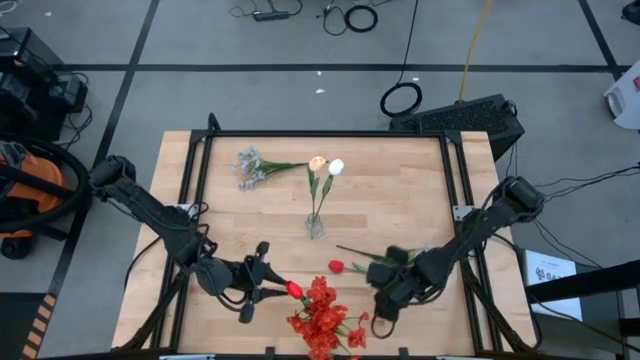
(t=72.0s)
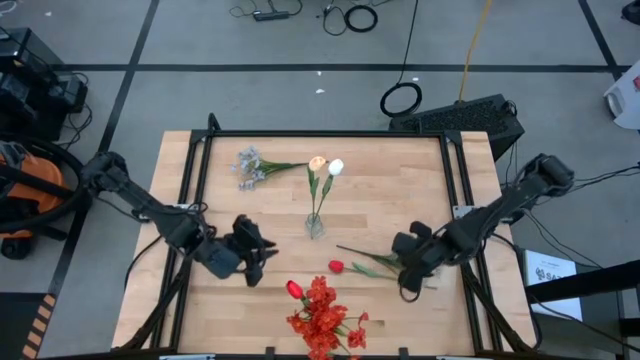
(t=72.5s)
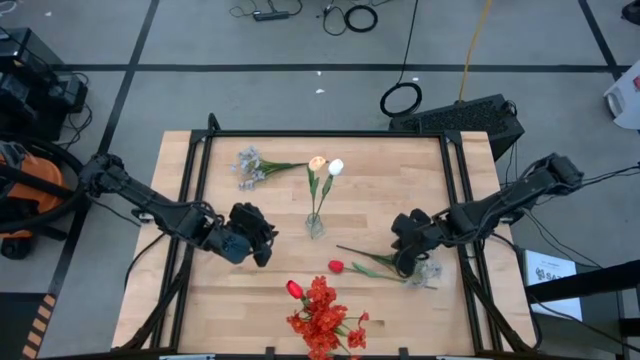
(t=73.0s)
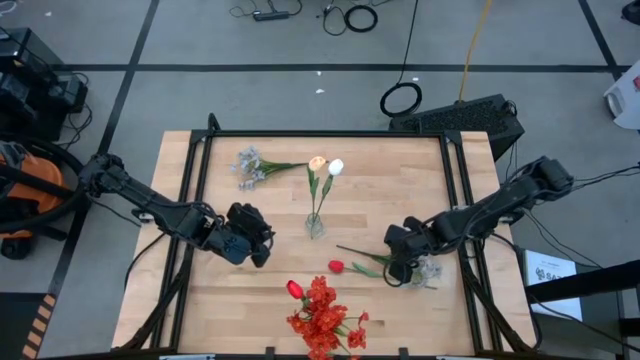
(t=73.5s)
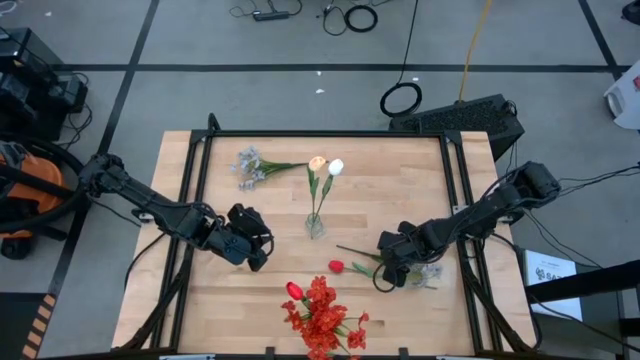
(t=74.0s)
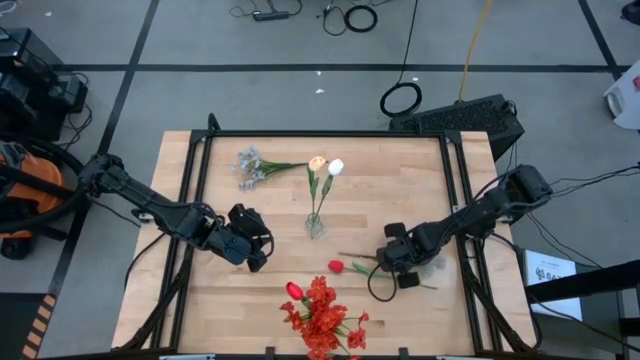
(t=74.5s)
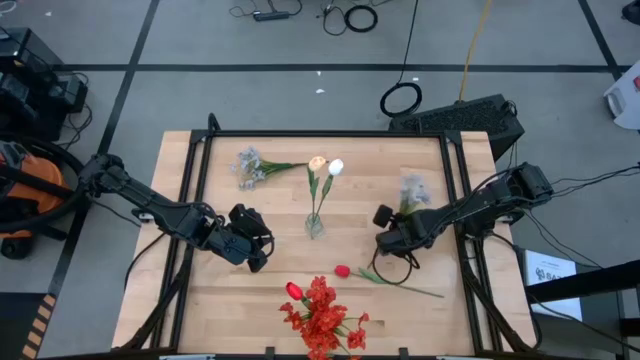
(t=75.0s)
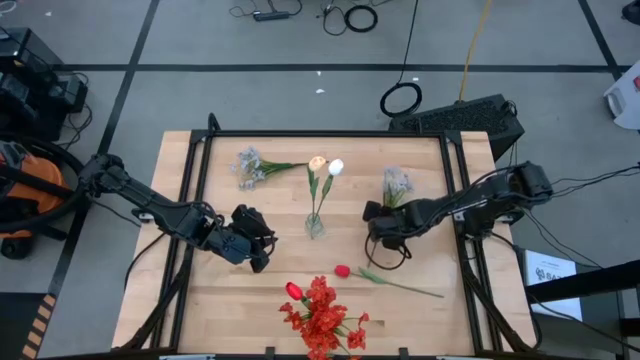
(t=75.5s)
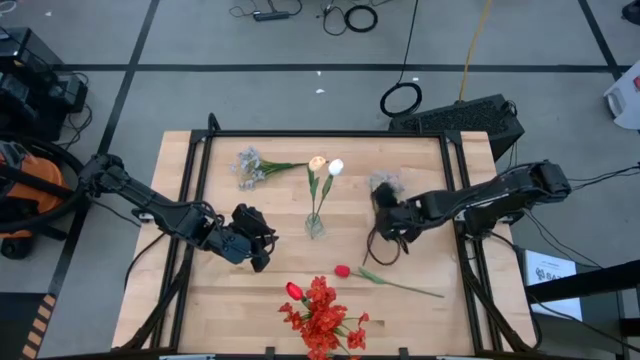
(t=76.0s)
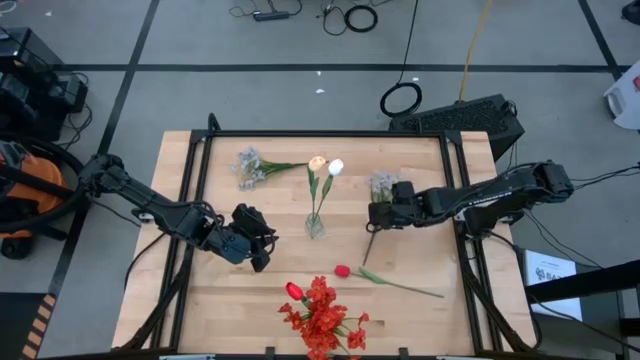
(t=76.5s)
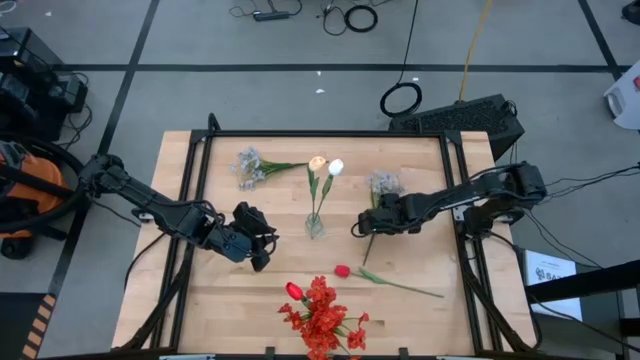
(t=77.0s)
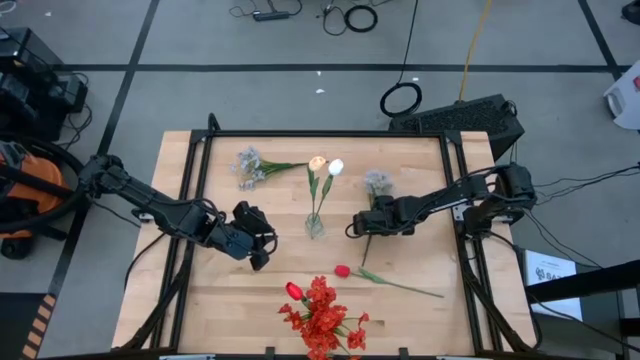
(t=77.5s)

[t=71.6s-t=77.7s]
Task: Sort flowers into vase by color
Put the bottom white flowers into the transparent vase

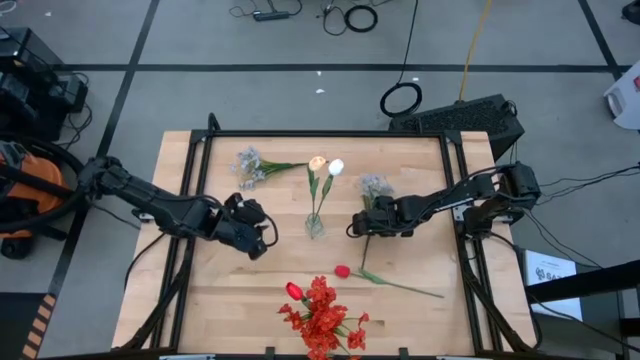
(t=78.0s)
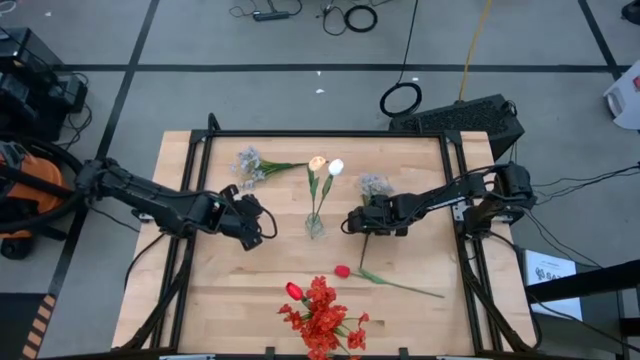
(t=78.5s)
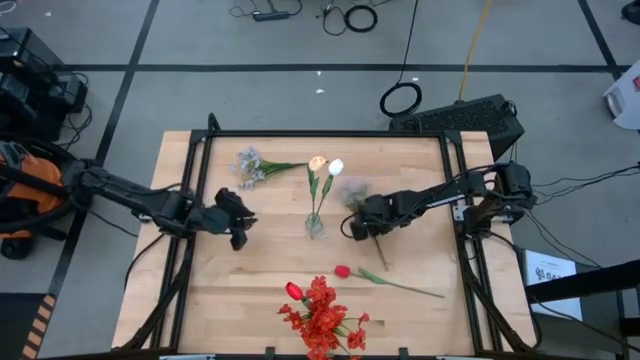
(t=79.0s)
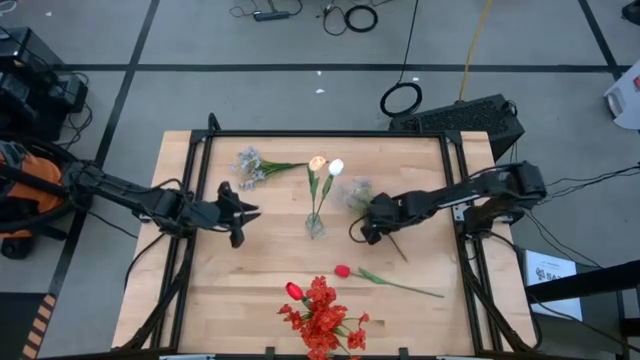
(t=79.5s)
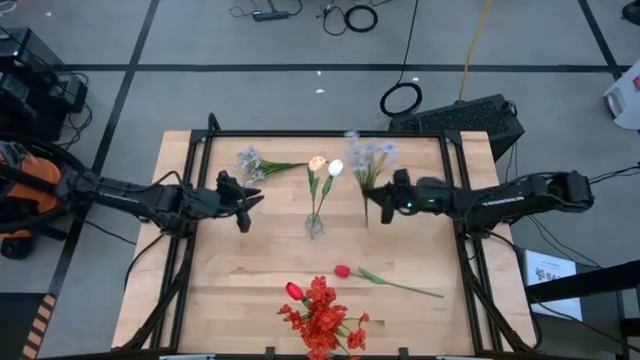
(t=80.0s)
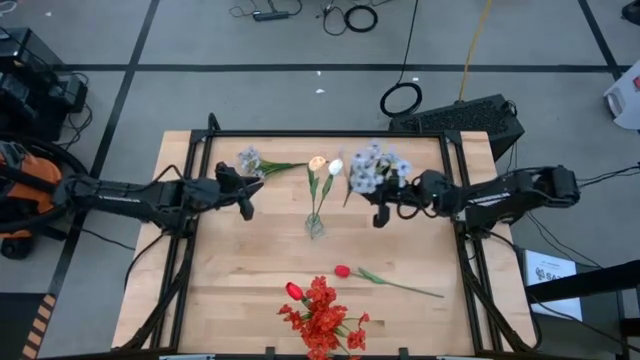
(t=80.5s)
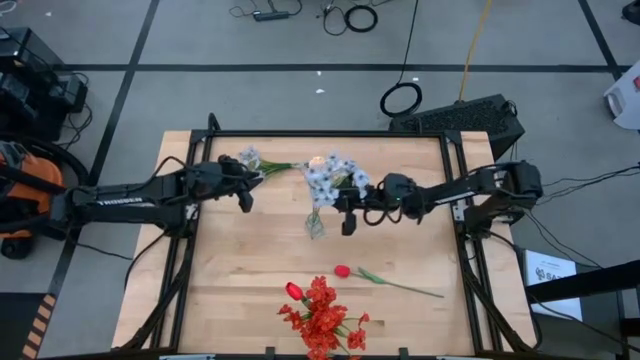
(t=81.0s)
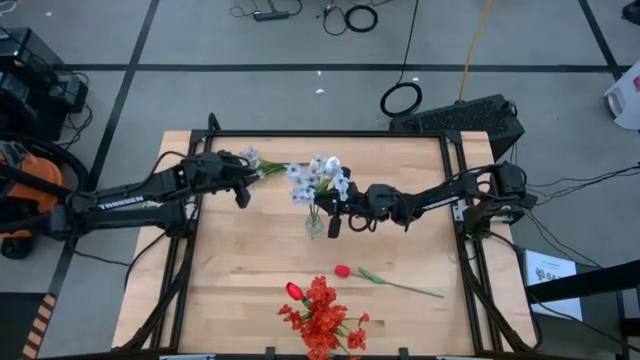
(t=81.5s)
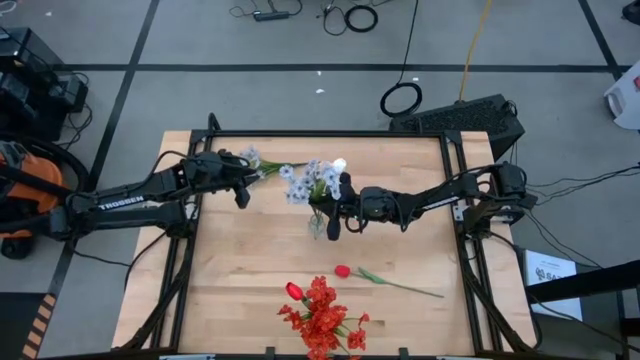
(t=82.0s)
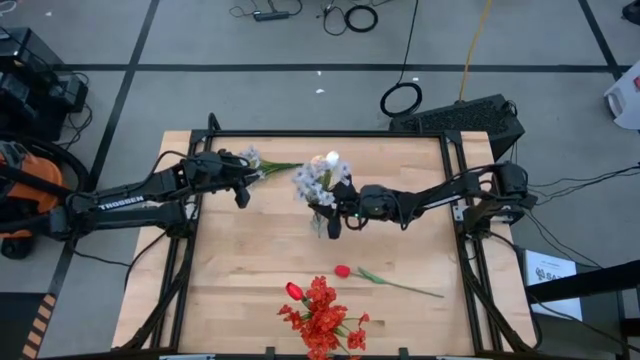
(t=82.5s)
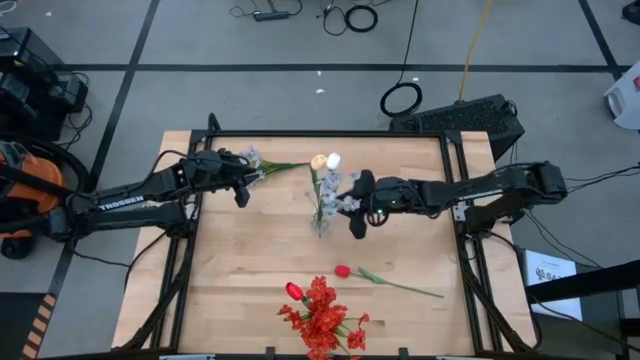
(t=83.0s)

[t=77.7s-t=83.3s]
Put the bottom white flowers into the transparent vase

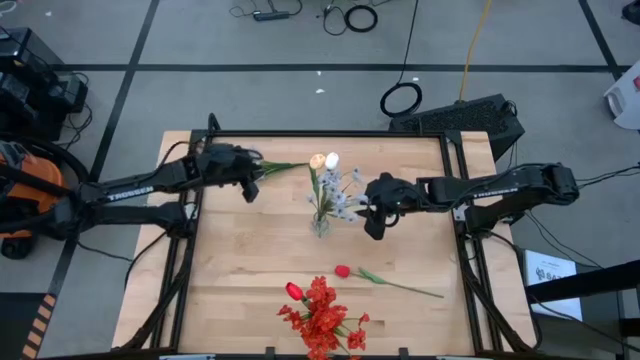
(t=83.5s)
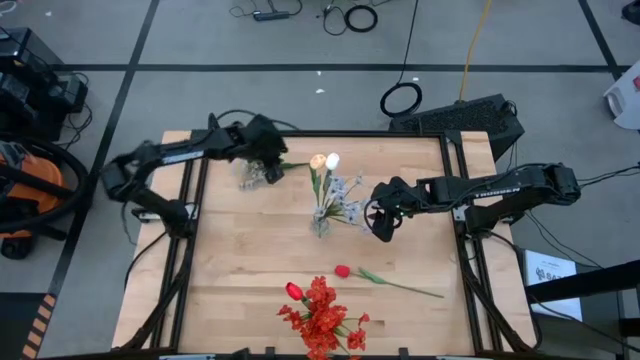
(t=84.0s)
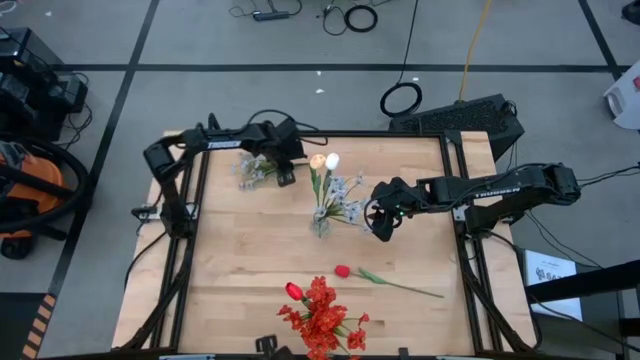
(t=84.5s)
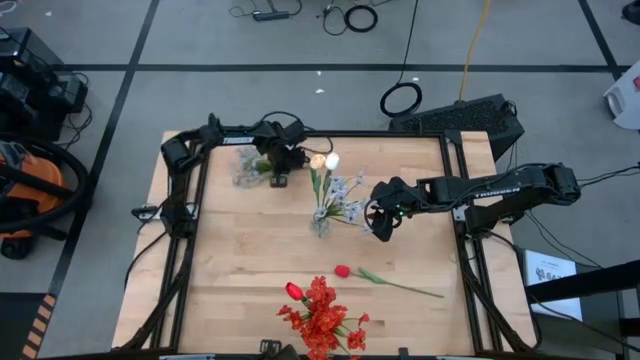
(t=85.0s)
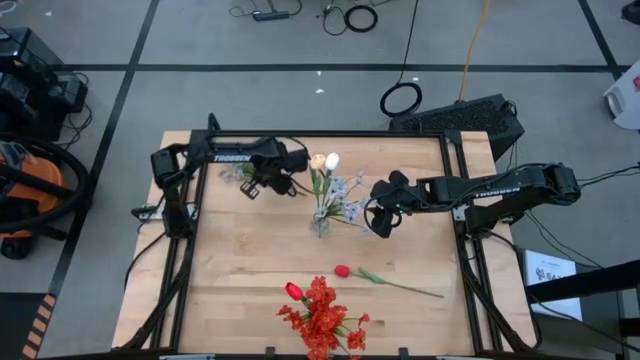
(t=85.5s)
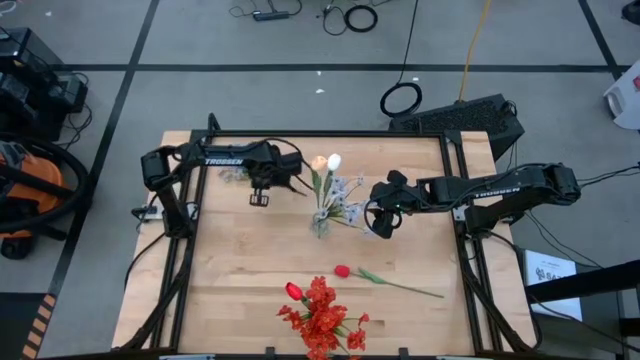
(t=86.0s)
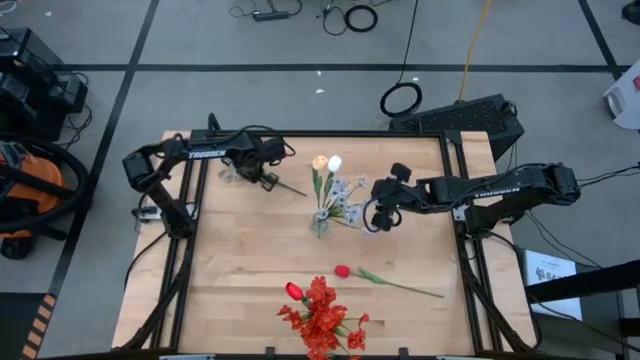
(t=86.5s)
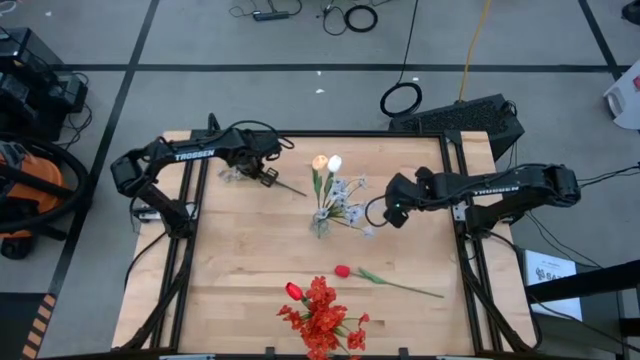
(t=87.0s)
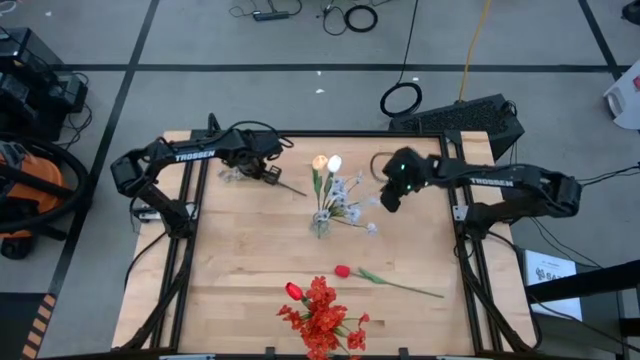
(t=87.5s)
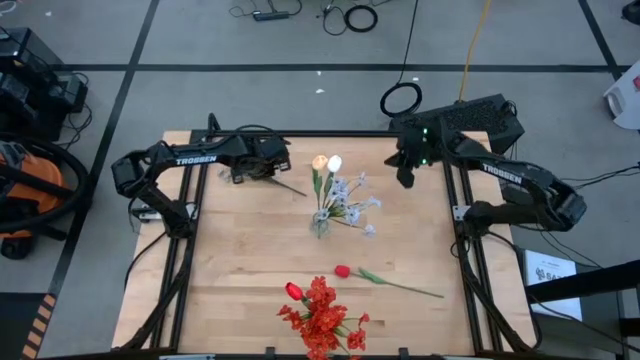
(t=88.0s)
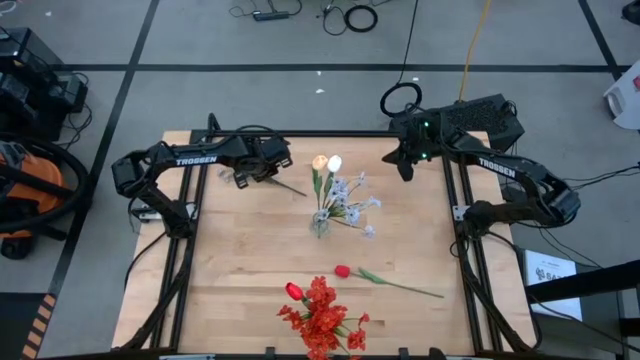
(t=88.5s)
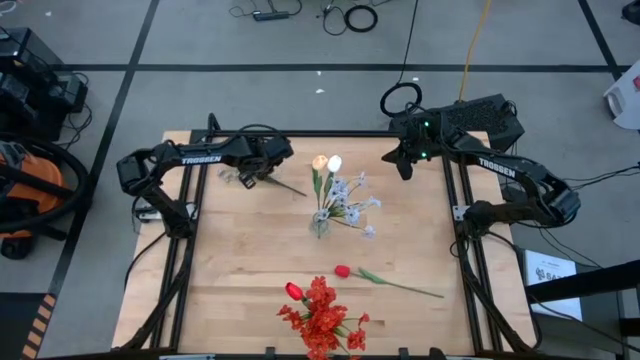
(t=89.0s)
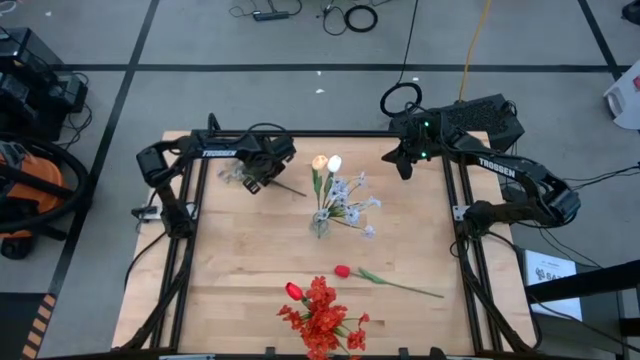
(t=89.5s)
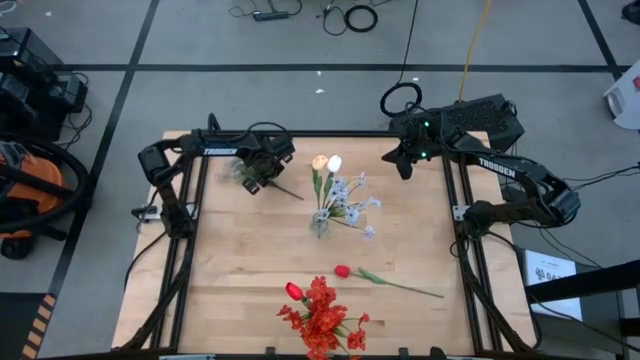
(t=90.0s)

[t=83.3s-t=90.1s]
Put the white flowers into the transparent vase

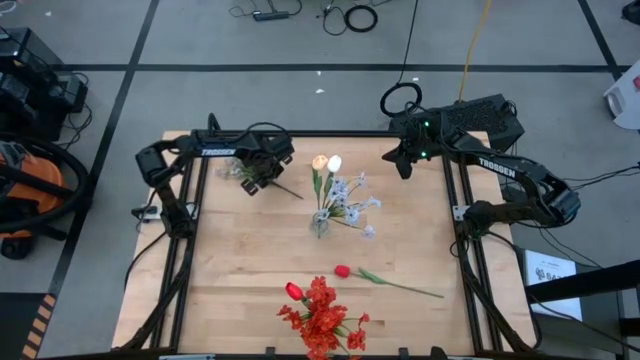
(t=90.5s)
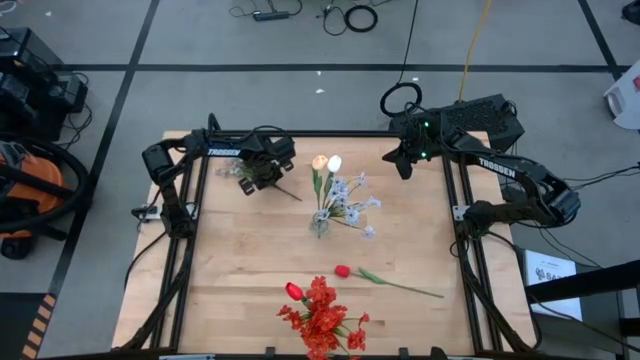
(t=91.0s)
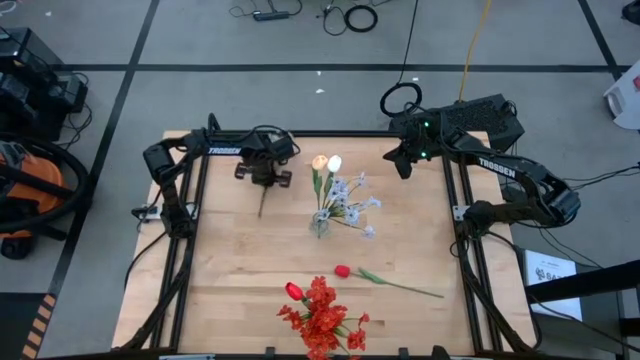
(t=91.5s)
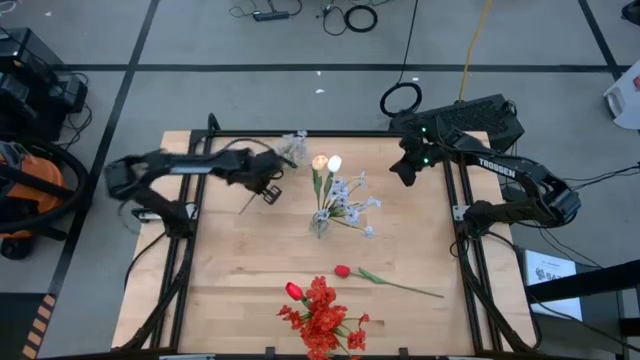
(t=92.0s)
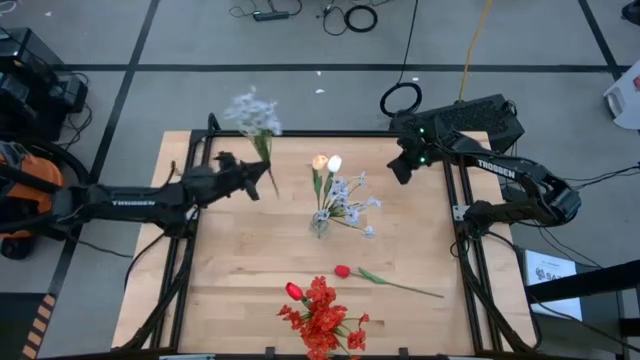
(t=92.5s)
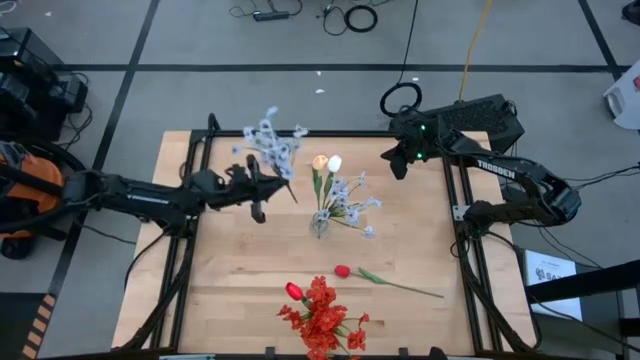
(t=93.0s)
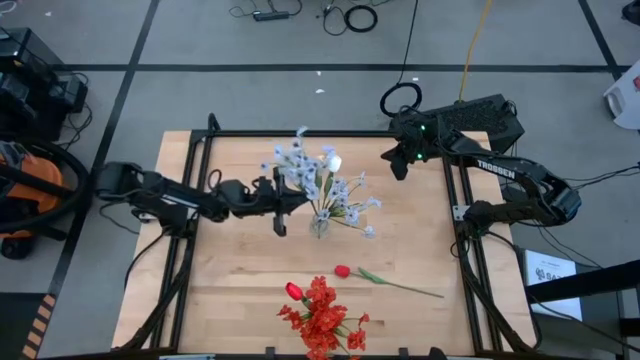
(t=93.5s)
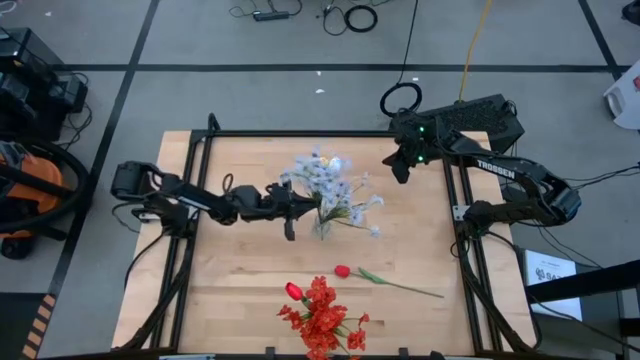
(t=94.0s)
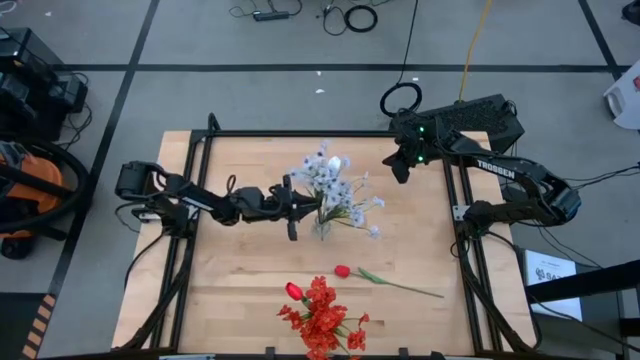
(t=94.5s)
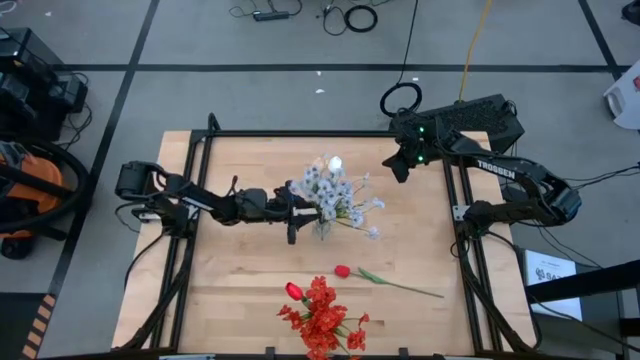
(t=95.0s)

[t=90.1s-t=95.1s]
Put the white flowers into the transparent vase
